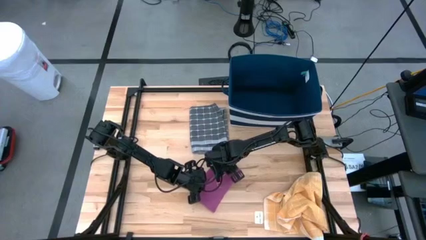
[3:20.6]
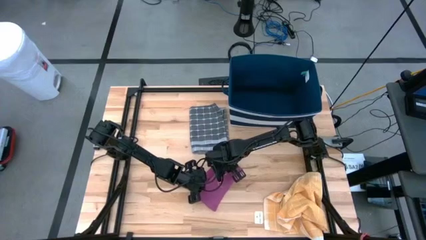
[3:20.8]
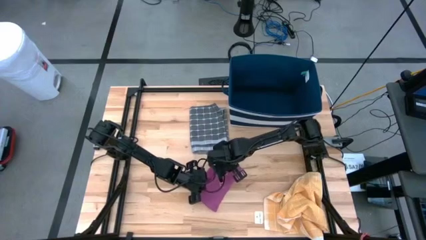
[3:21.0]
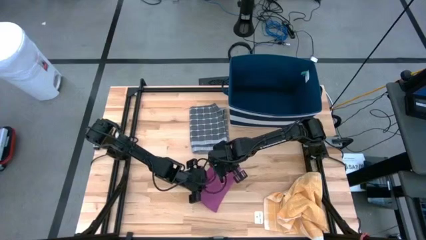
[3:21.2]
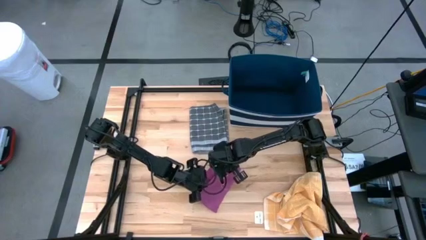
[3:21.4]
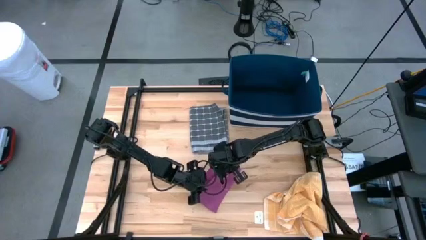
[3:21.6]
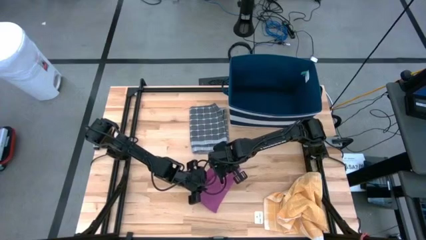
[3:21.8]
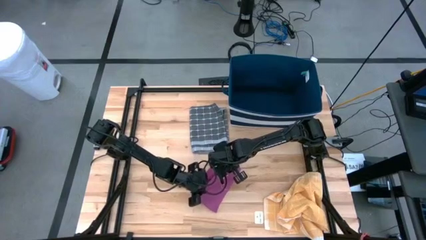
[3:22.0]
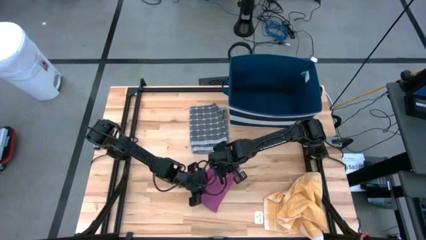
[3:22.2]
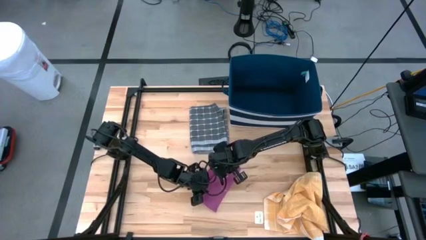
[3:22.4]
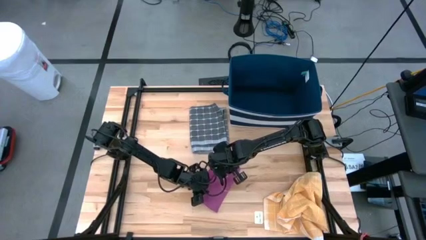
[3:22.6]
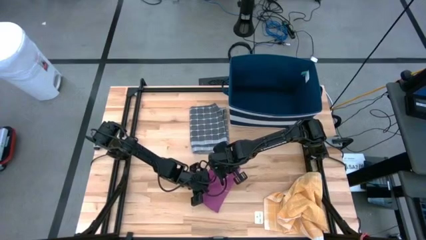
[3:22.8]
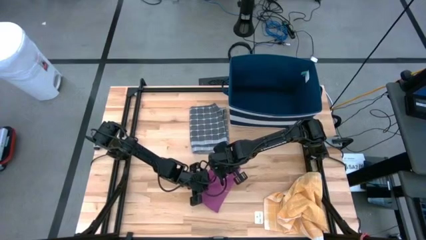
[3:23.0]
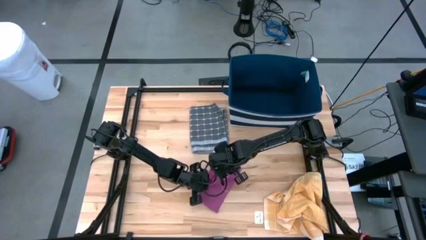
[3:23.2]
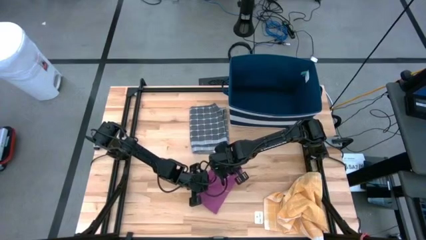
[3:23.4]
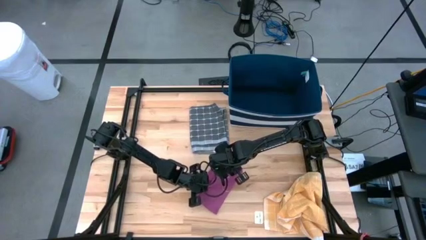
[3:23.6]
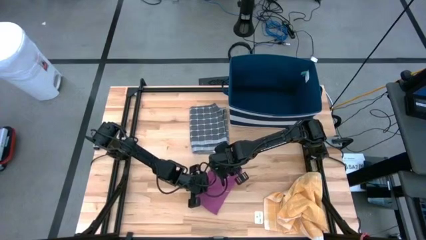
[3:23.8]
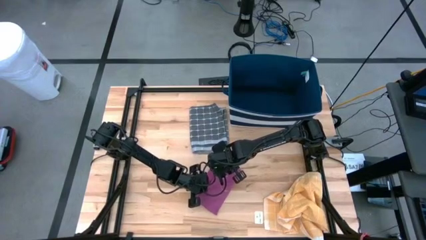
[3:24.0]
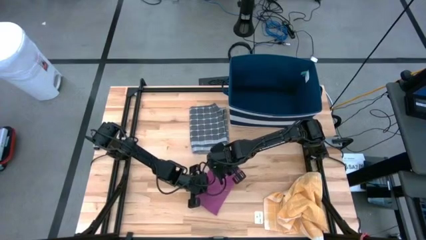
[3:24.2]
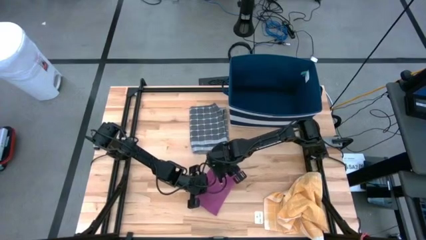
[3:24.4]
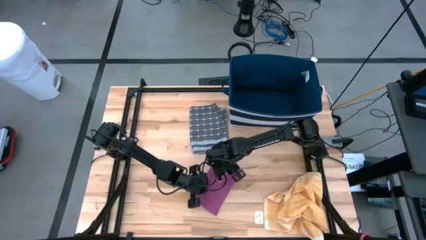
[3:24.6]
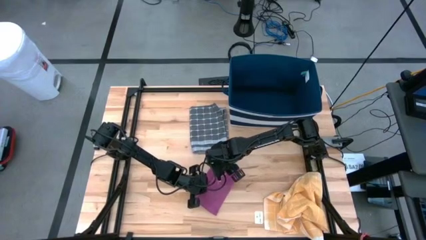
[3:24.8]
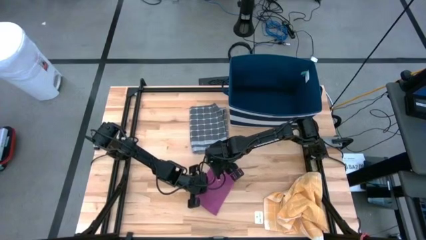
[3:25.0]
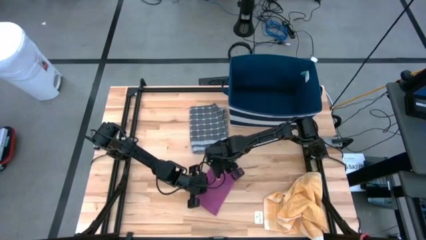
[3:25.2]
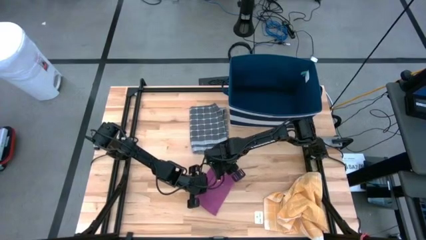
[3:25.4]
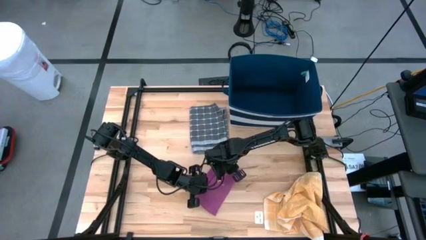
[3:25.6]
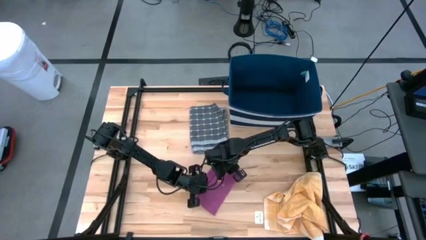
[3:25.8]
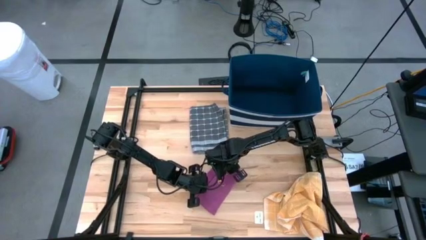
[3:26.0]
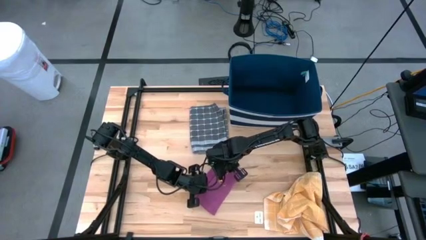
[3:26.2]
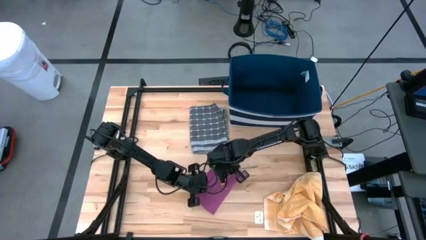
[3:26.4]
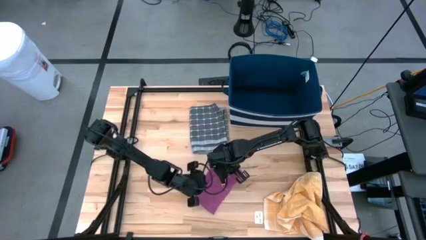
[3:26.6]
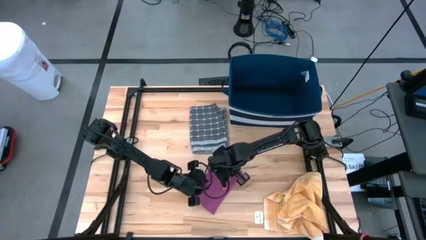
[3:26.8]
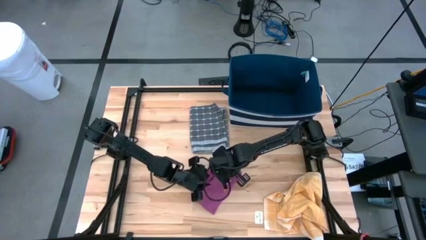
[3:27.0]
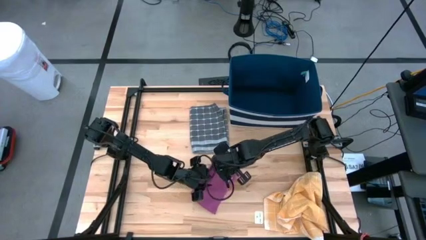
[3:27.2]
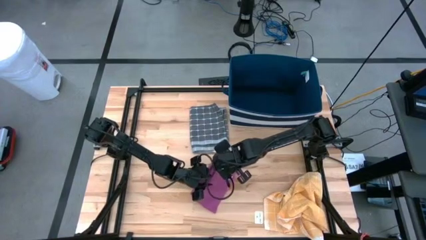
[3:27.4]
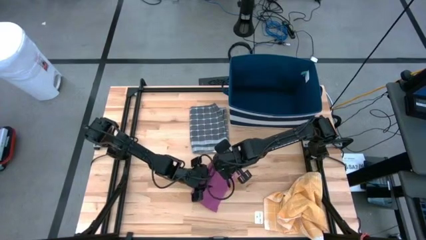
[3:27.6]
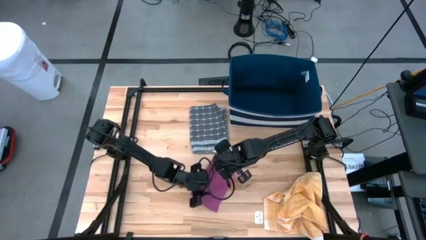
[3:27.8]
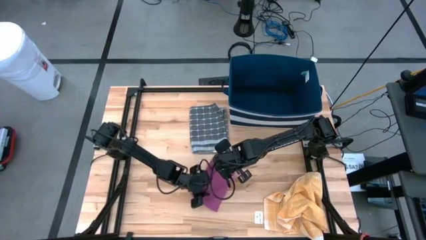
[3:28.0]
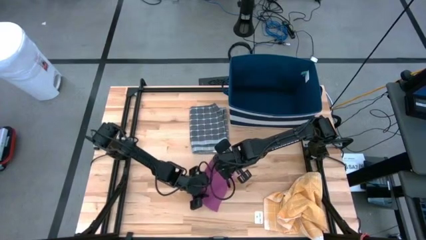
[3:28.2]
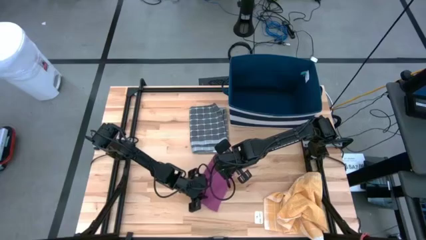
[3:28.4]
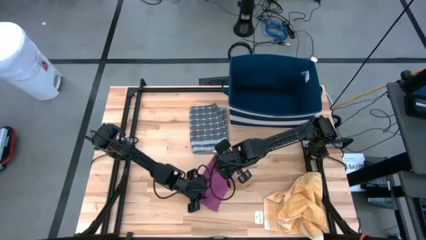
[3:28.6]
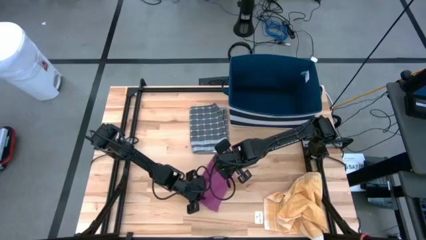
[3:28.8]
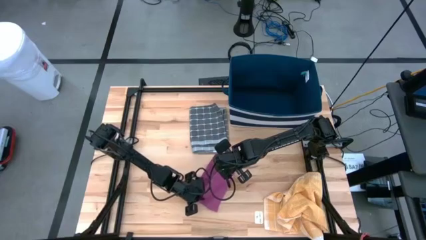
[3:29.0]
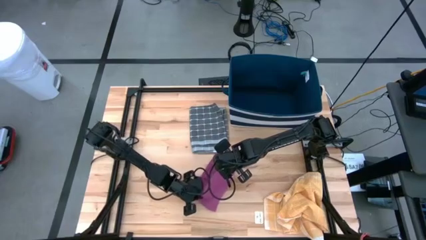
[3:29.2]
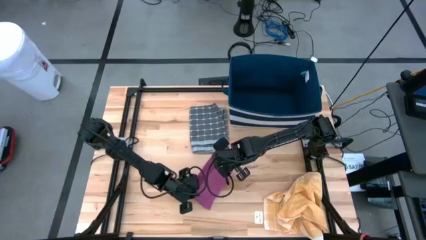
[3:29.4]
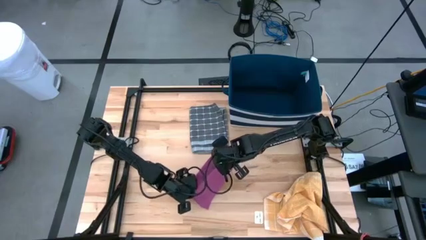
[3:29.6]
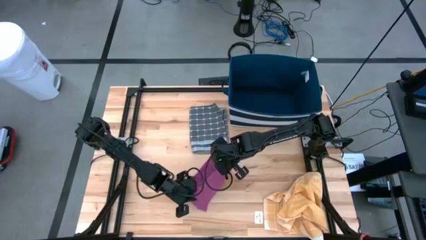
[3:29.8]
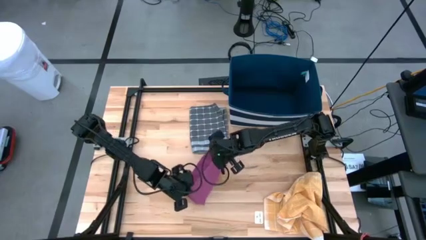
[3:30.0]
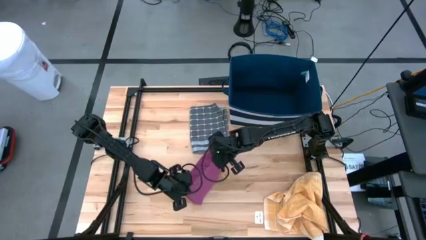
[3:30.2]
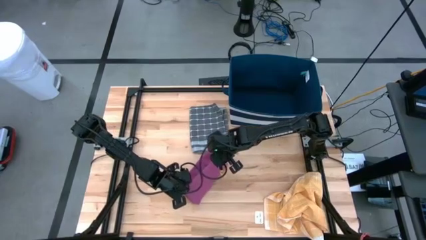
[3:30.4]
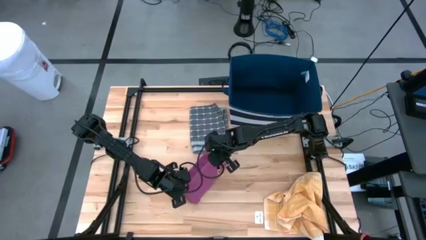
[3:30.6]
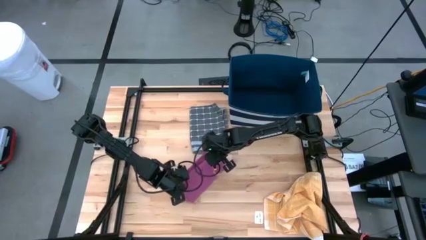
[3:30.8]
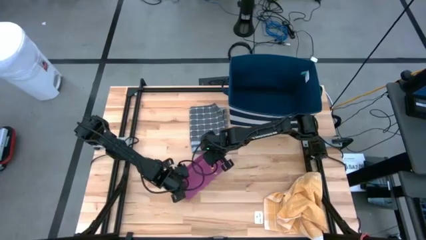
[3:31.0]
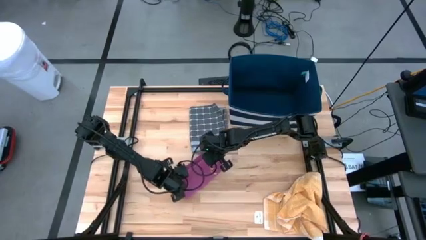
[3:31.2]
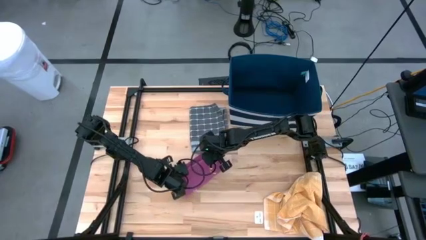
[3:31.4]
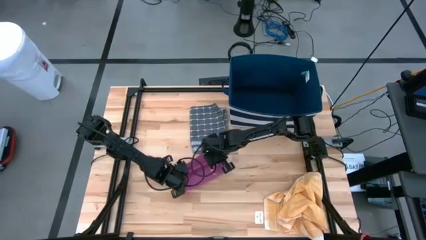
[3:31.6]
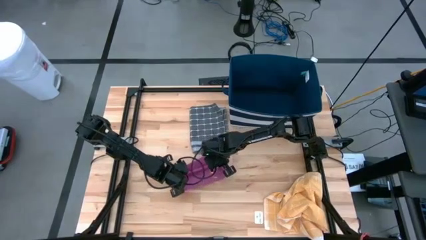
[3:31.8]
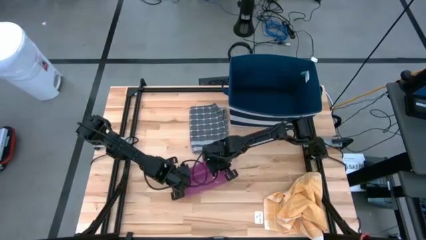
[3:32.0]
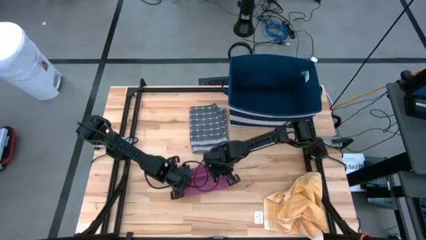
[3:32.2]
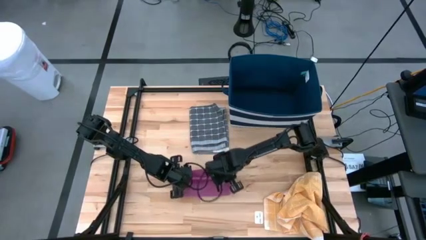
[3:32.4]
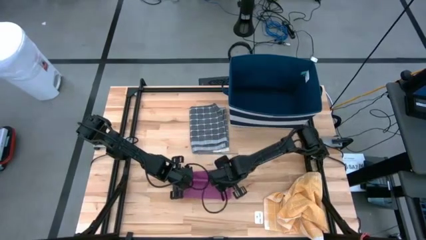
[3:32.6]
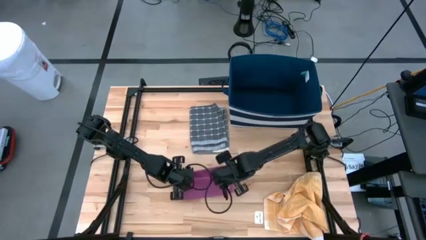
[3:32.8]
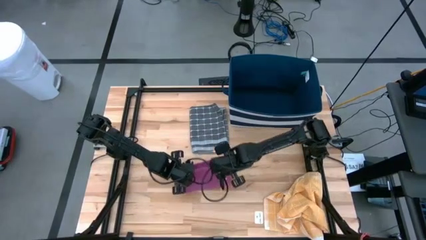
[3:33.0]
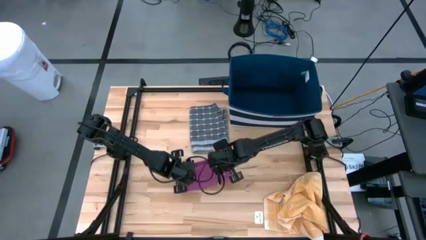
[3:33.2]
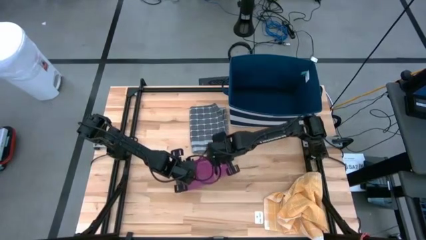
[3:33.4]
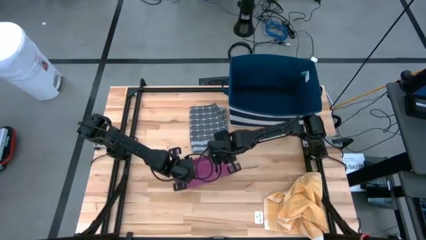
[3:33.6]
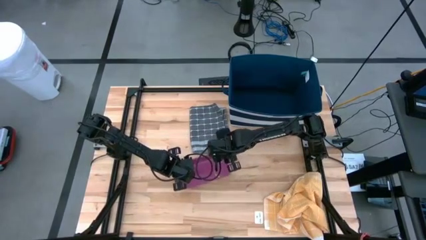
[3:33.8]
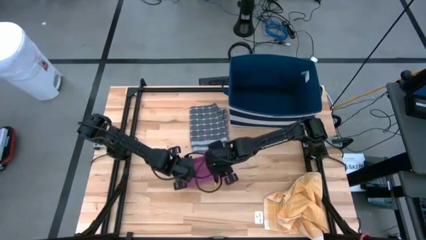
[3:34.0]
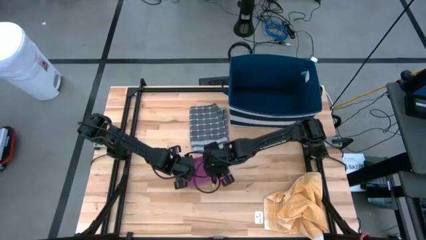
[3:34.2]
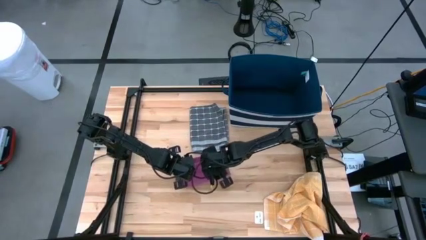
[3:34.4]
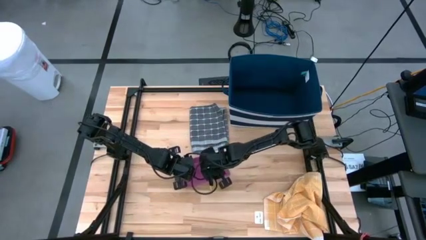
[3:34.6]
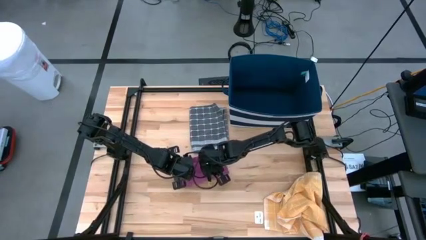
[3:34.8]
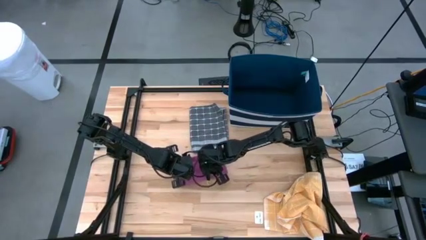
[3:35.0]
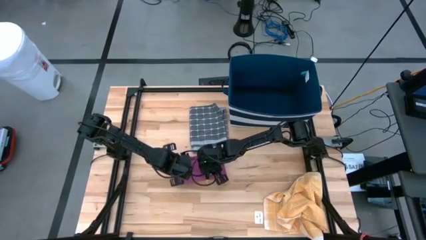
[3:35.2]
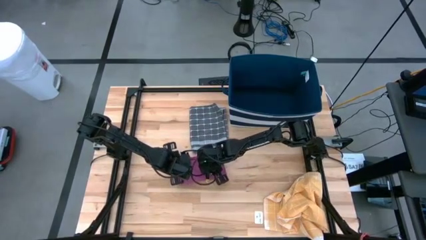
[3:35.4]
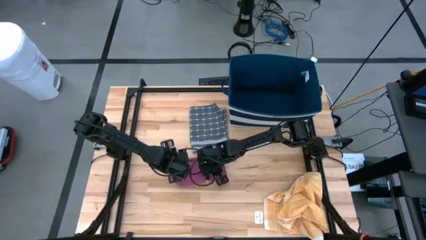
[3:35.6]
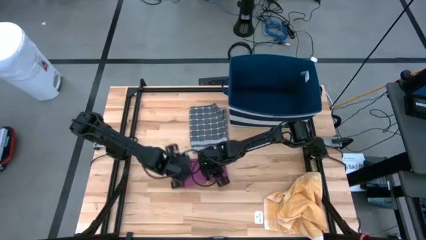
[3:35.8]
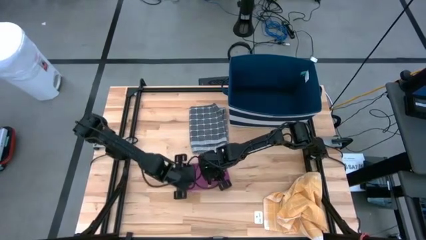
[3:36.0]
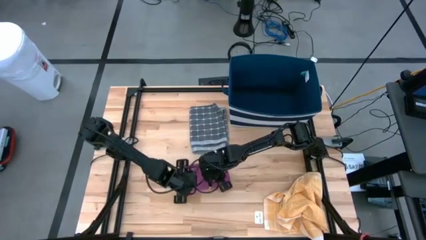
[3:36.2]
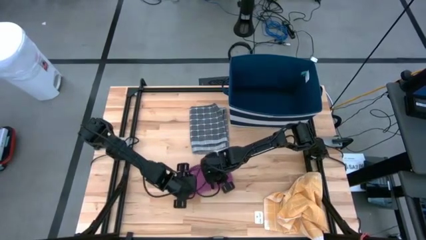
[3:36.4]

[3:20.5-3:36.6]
Task: Fold towel
Fold the pink towel
